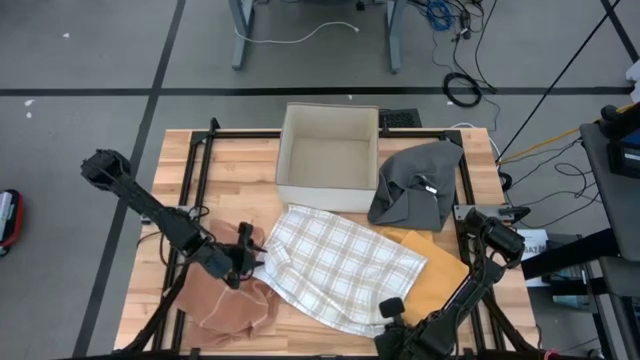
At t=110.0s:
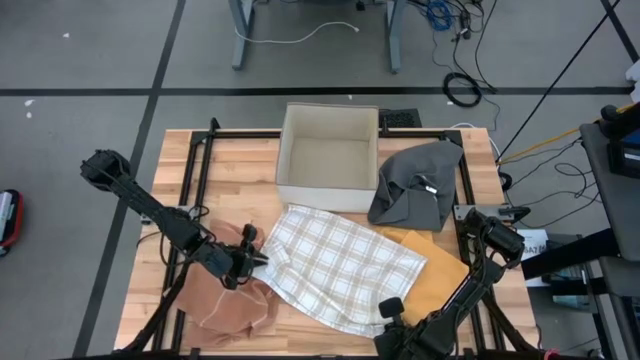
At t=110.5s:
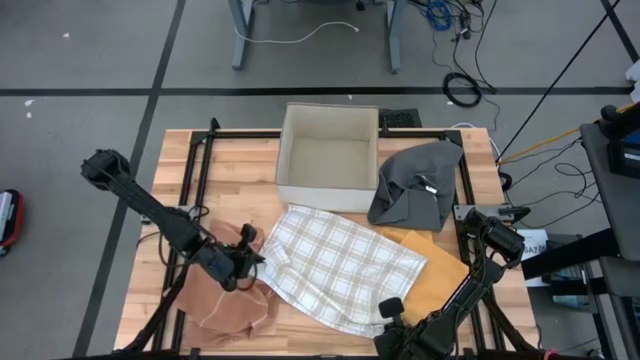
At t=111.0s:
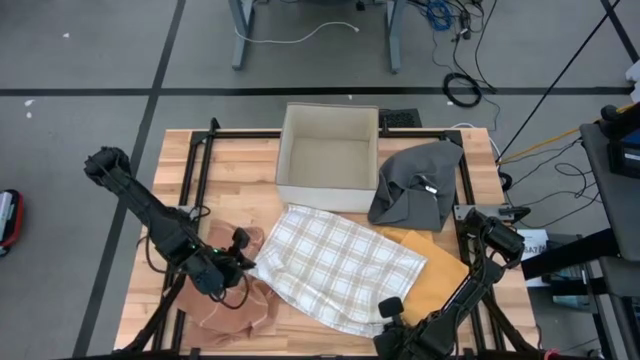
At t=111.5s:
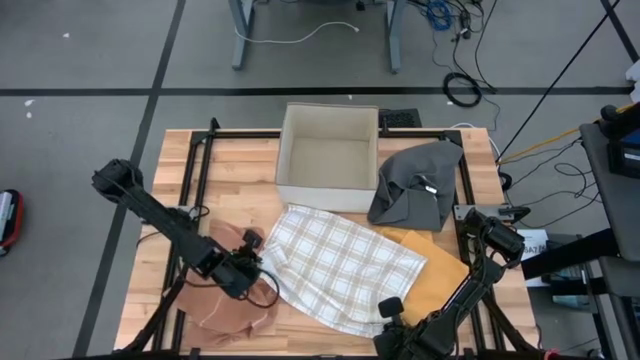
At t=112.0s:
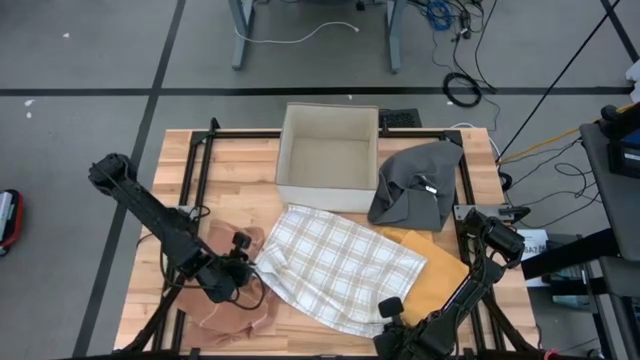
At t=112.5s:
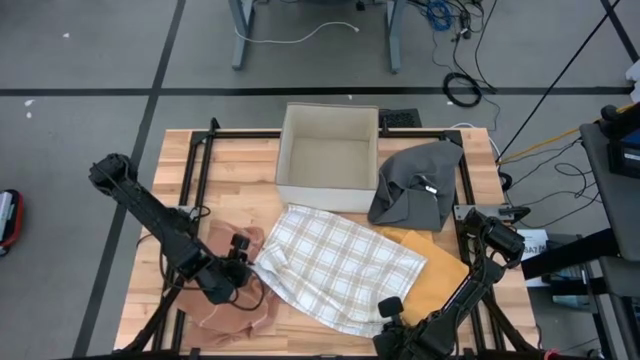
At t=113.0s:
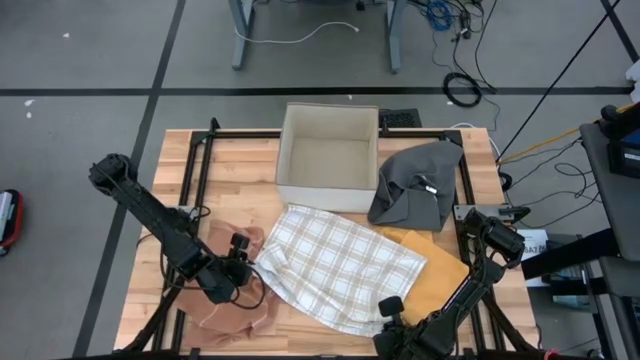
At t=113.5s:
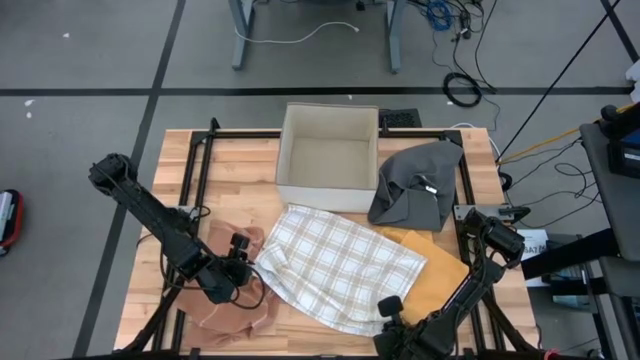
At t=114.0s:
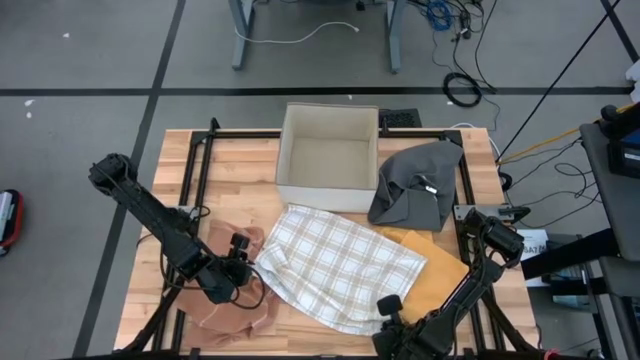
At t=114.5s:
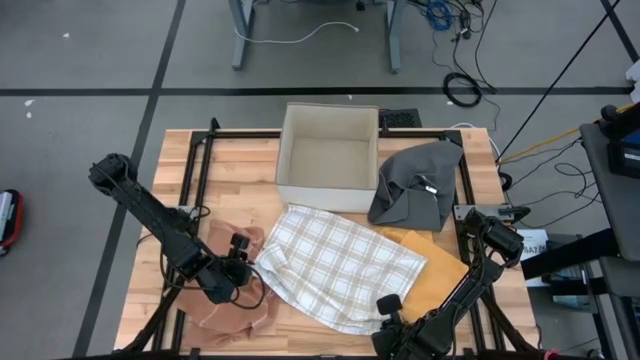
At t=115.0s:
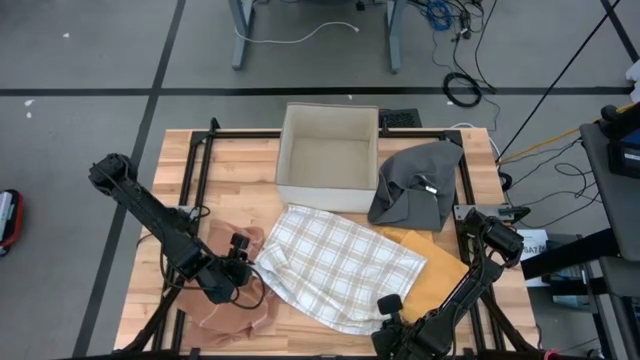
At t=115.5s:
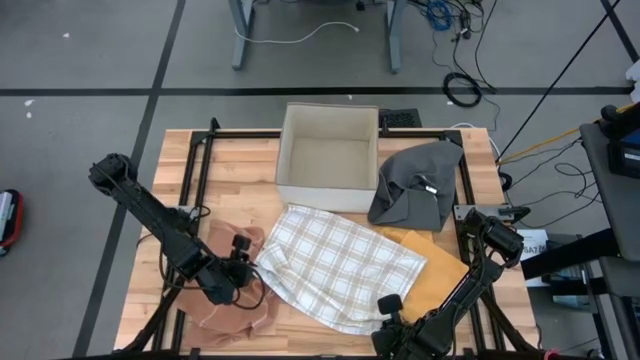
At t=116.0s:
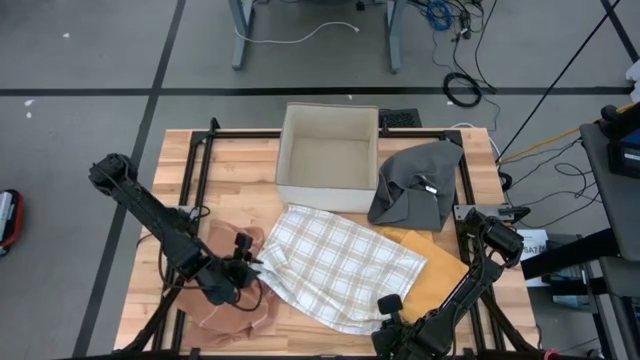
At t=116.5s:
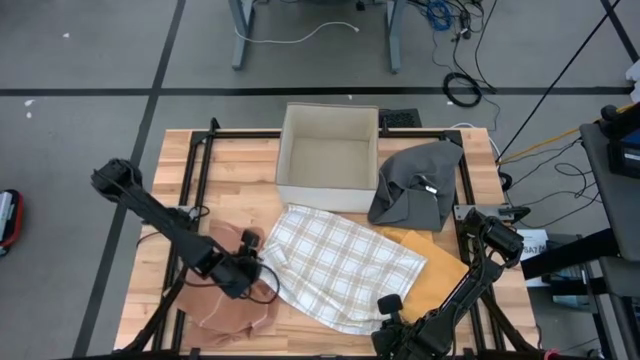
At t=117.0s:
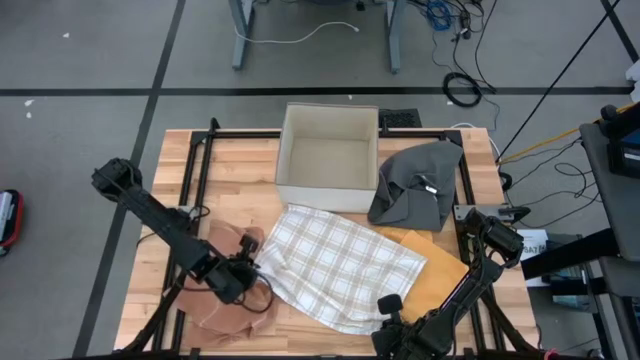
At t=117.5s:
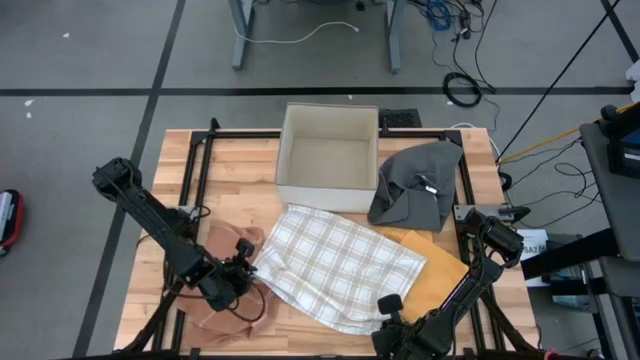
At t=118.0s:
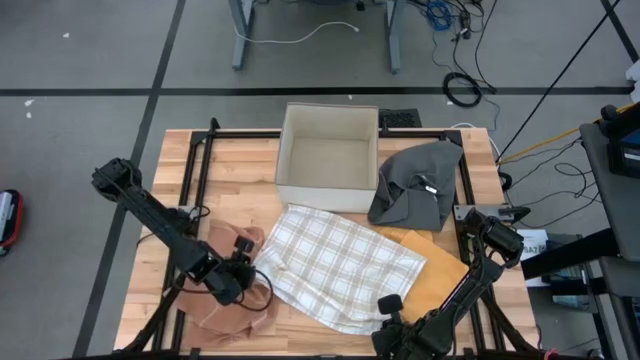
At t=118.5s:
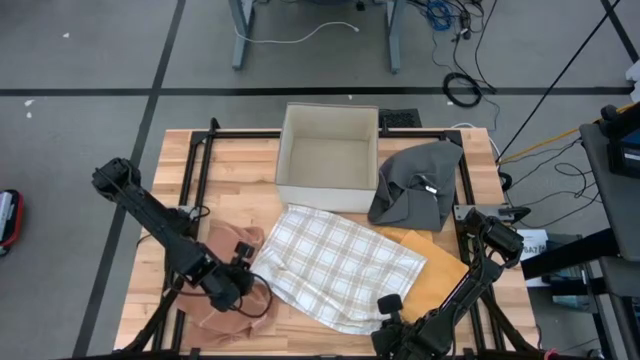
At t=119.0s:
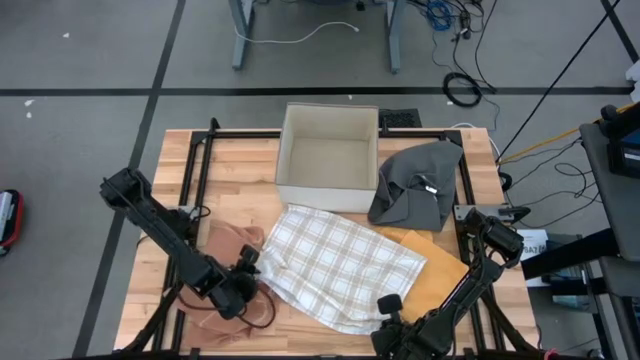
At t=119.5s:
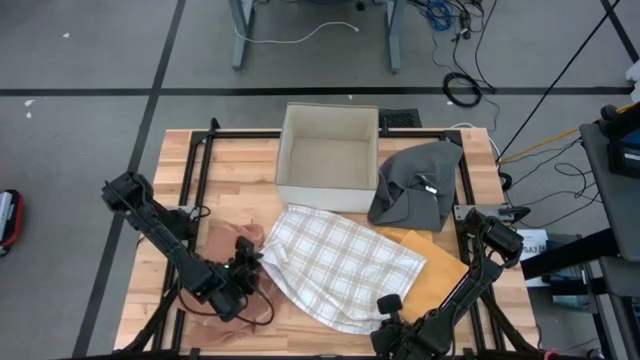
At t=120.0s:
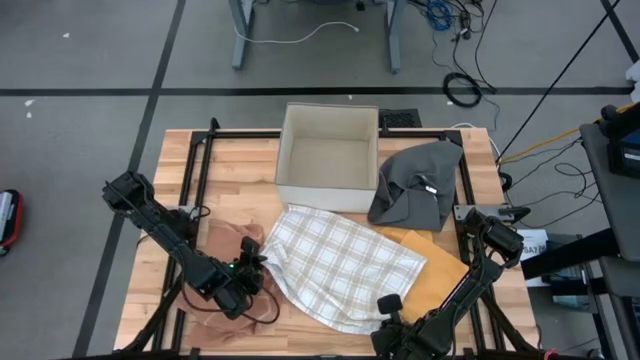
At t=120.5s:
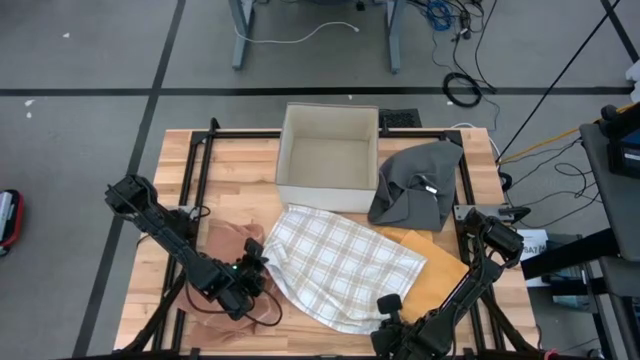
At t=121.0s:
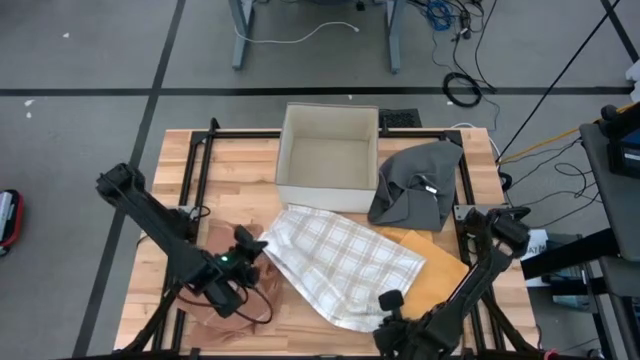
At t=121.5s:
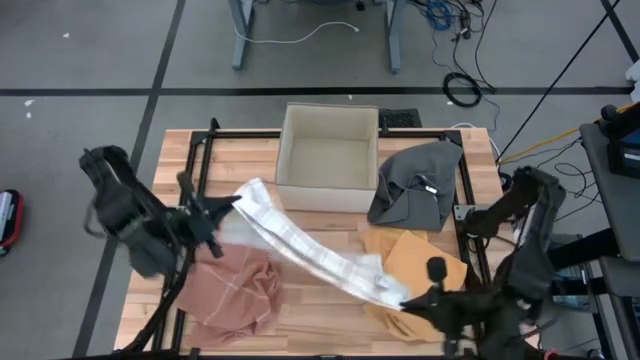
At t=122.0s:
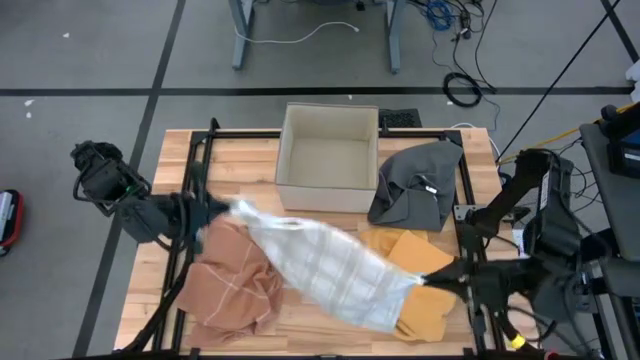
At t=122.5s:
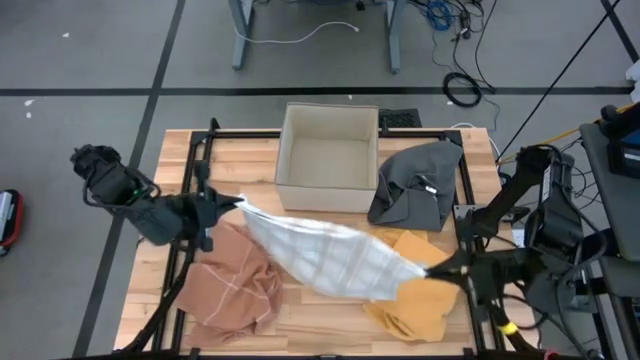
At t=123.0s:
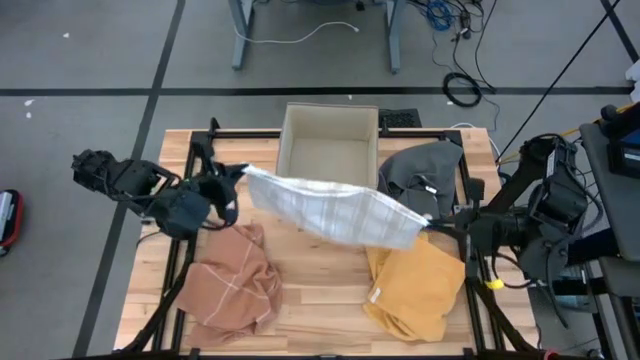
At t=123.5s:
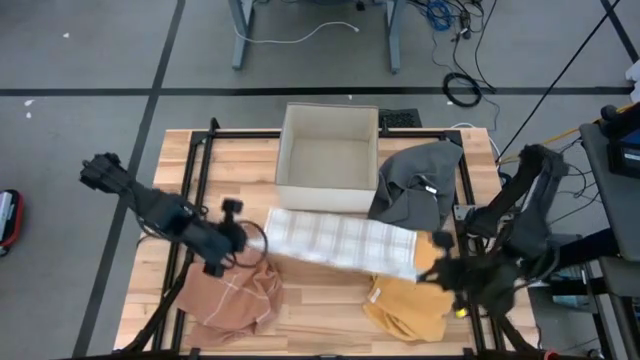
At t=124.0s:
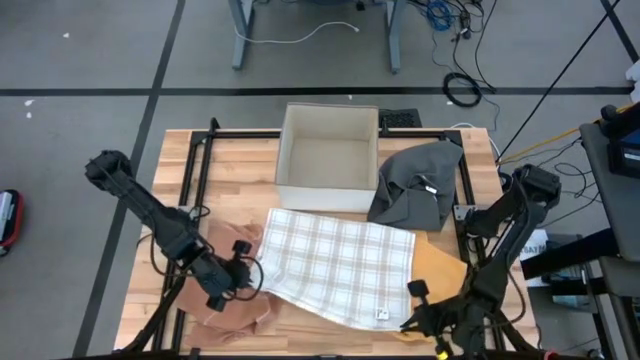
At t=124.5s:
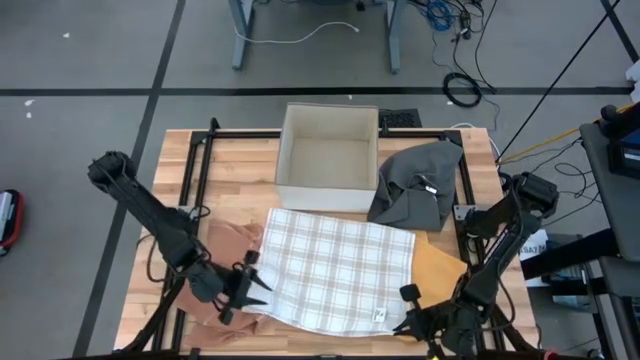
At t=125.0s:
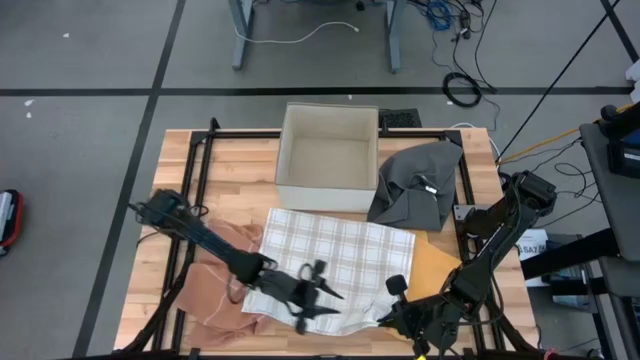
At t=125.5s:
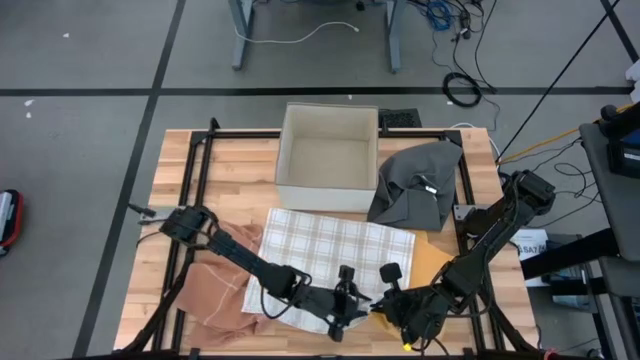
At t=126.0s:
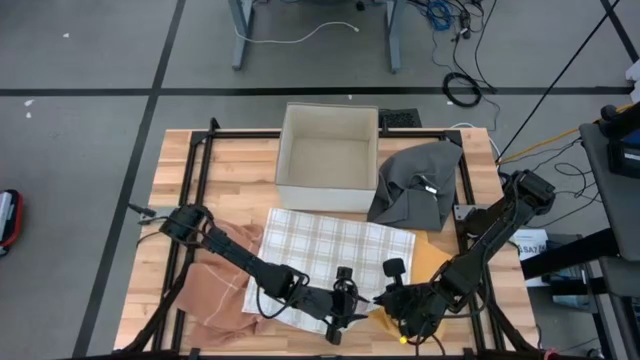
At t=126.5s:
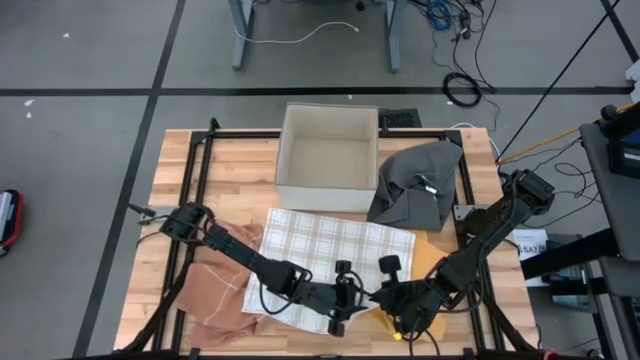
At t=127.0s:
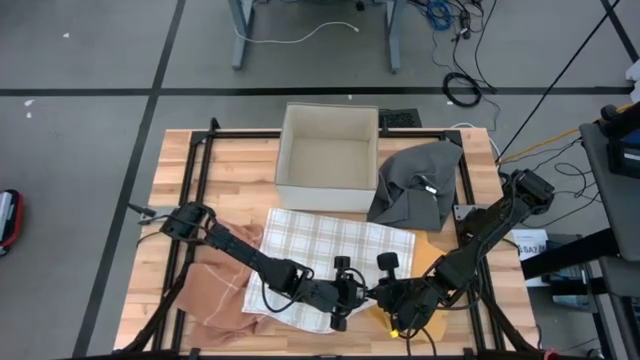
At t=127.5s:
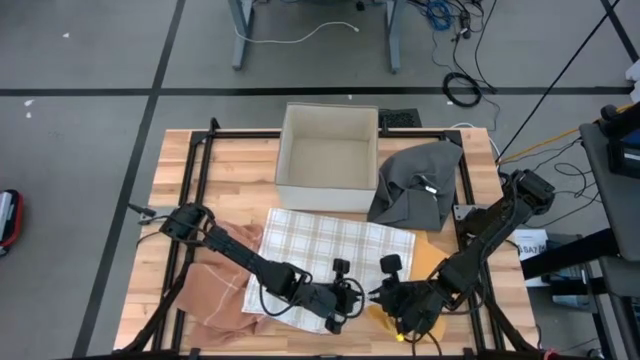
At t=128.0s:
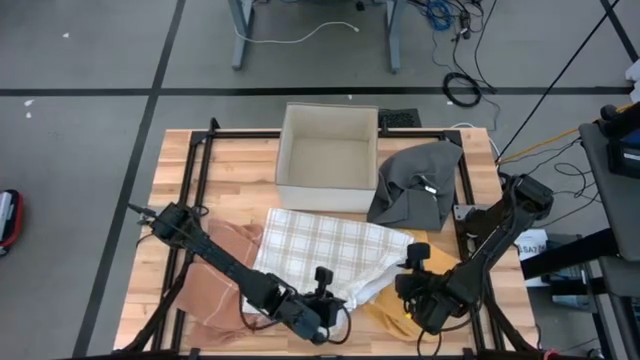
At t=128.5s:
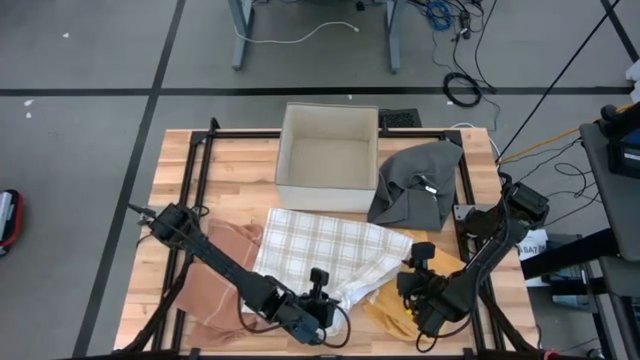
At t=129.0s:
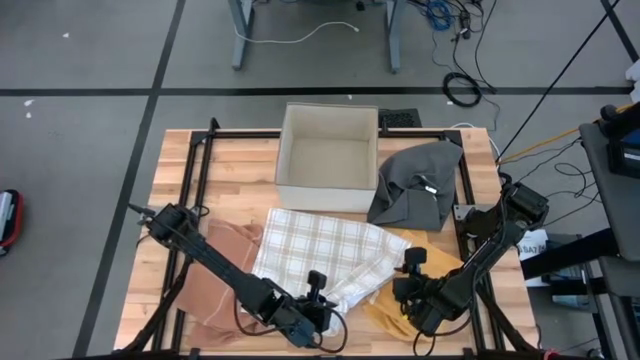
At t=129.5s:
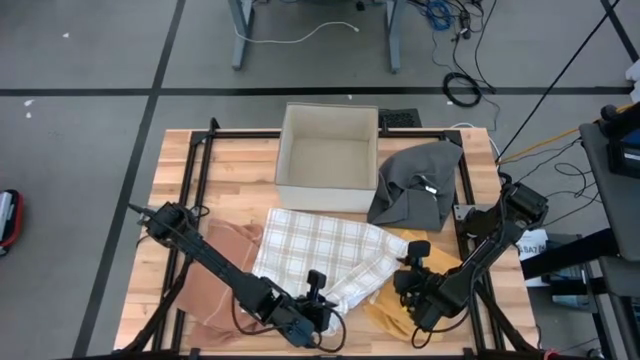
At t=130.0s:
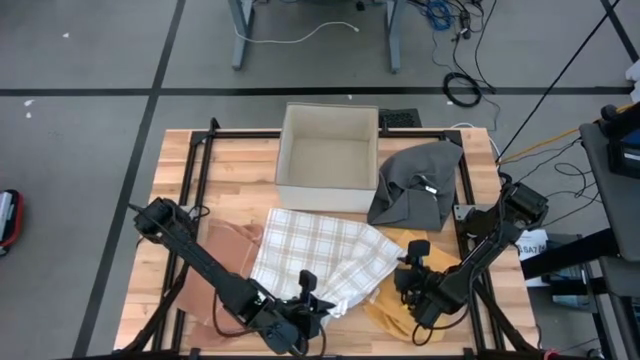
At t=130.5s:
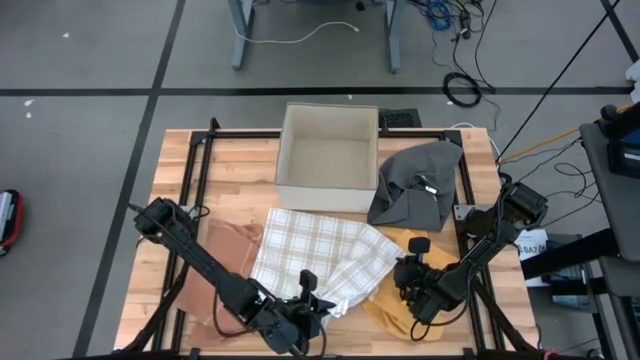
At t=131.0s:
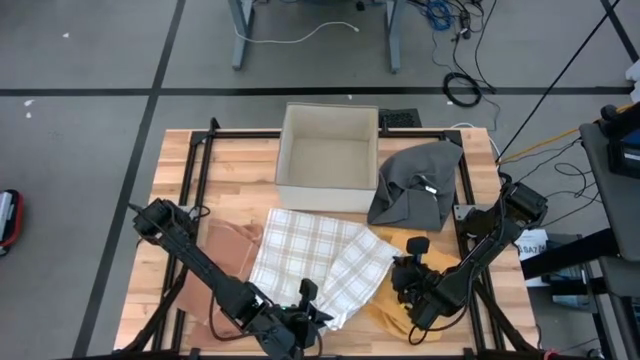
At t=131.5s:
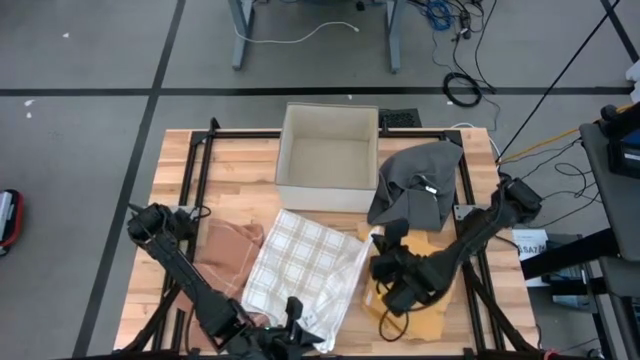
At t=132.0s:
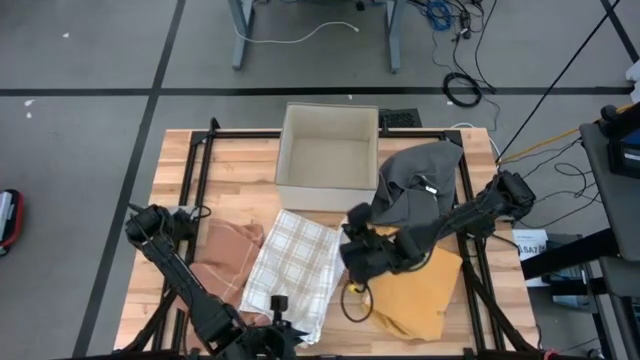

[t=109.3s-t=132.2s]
Task: Fold towel
Fold the white patterned towel
